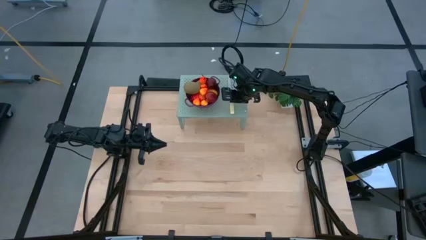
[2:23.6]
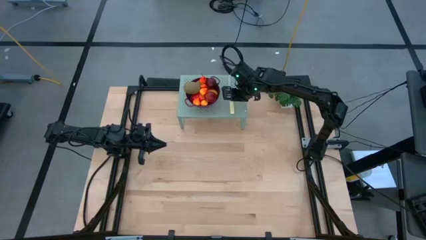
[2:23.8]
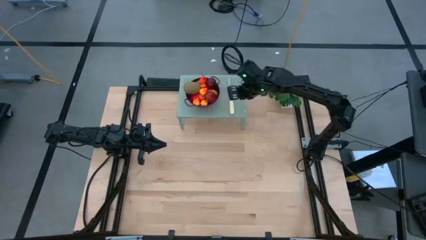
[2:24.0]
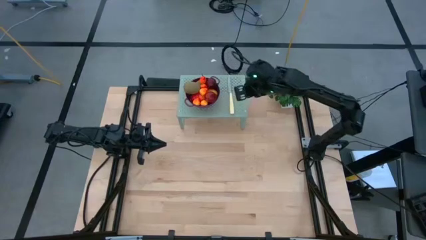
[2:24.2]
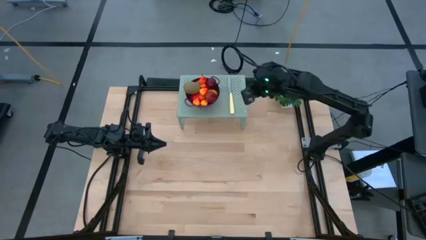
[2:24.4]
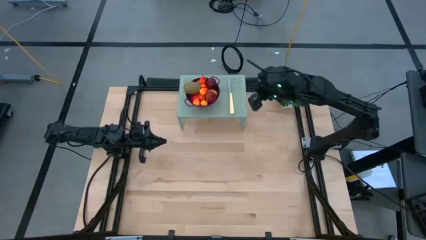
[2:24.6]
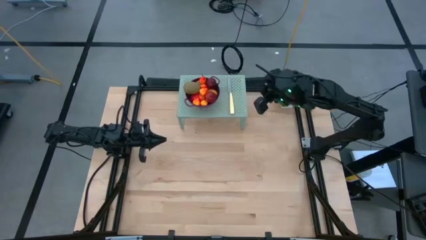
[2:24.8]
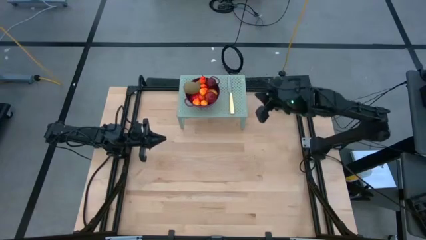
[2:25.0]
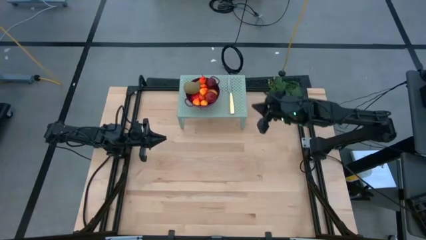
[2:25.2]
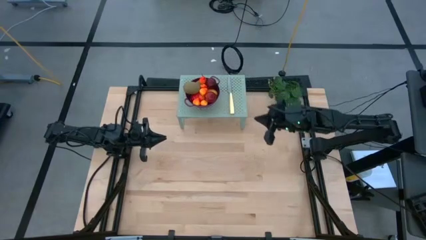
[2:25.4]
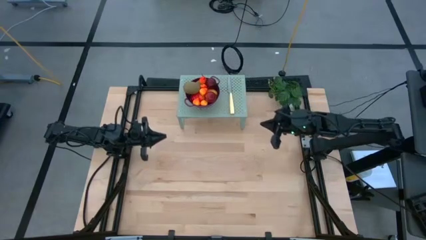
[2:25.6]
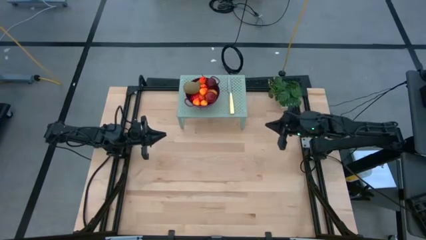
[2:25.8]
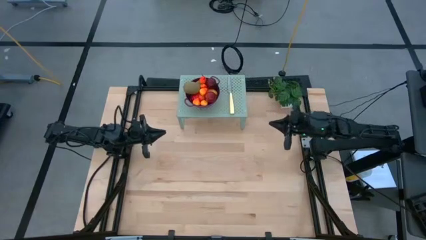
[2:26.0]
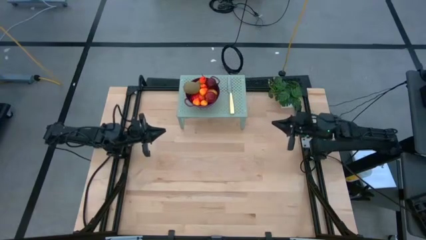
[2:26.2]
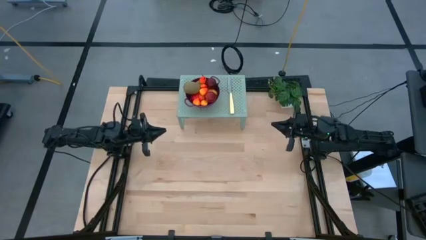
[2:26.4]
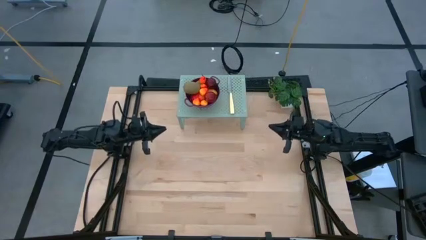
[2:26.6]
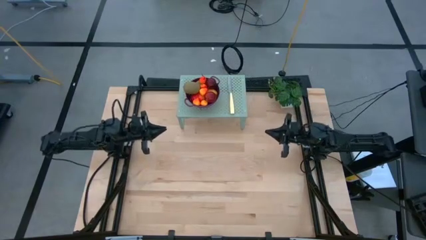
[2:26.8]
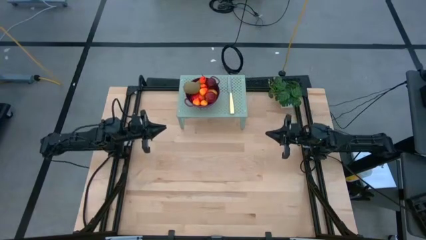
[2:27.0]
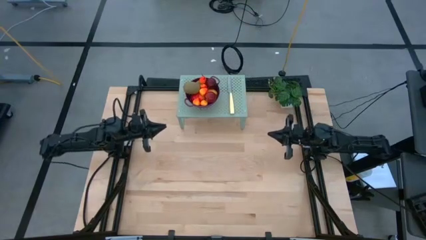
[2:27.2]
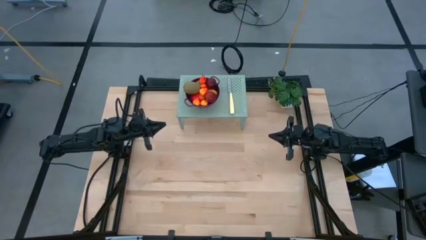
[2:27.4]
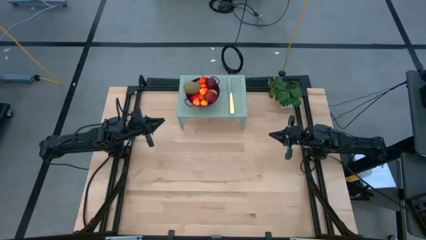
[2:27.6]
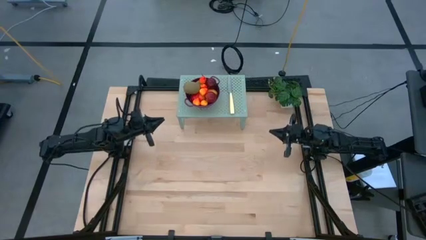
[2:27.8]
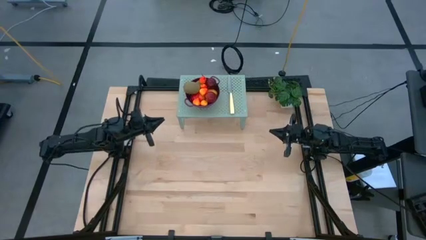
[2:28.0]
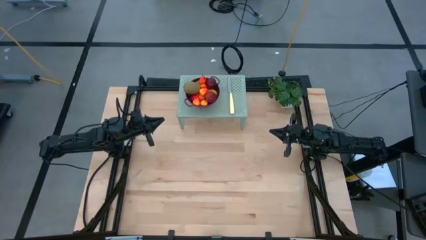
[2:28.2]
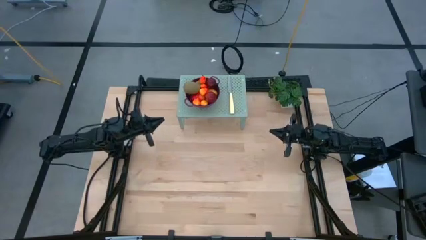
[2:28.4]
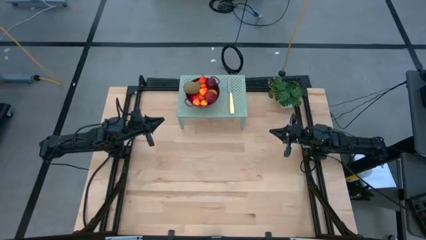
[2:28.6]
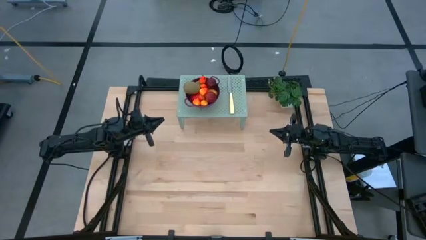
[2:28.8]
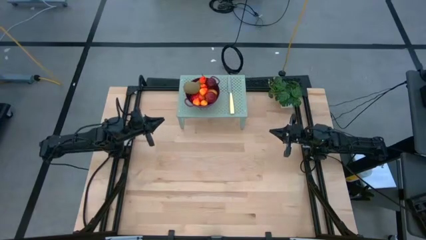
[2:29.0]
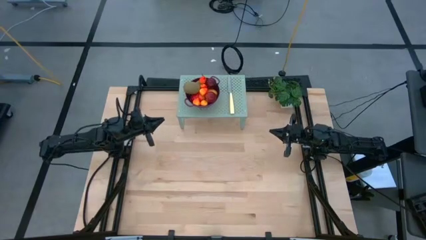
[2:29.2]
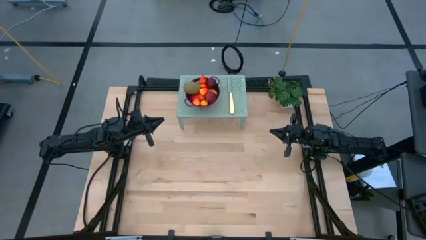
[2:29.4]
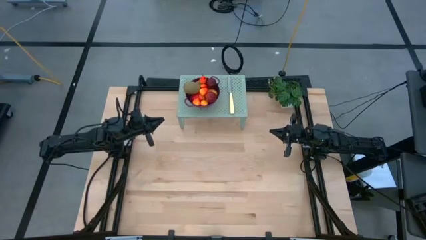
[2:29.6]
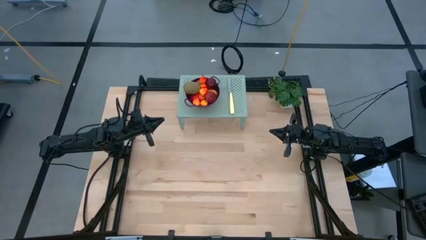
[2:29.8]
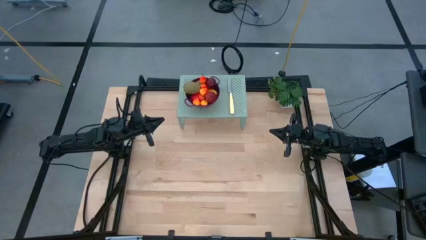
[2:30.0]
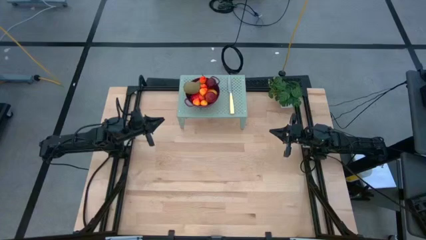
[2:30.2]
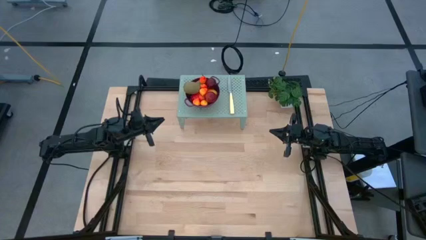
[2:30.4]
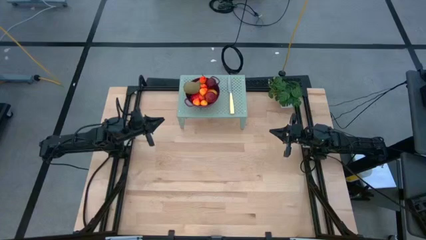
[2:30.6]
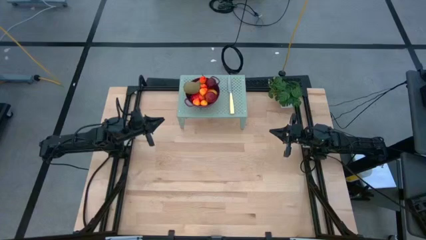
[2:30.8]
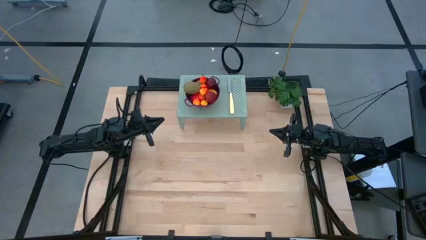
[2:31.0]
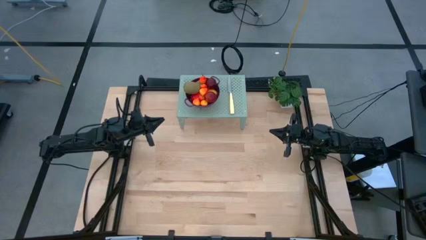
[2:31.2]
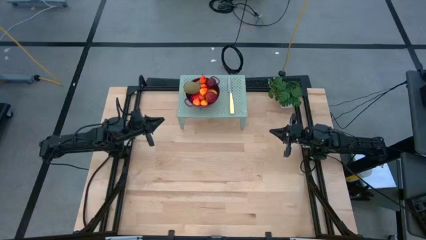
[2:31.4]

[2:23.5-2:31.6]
Task: Pick & Place Fruit
Return to Home Position

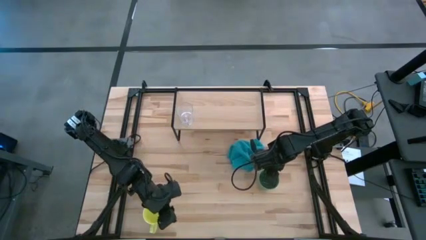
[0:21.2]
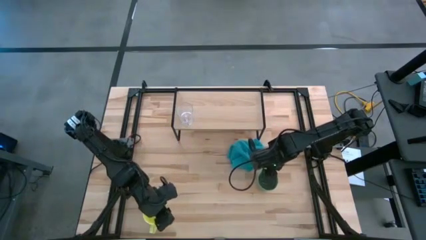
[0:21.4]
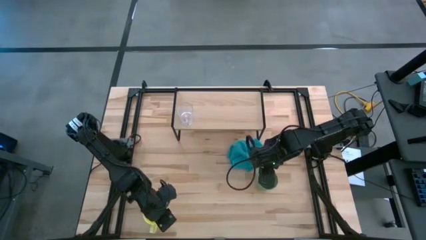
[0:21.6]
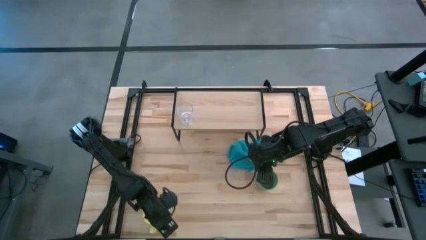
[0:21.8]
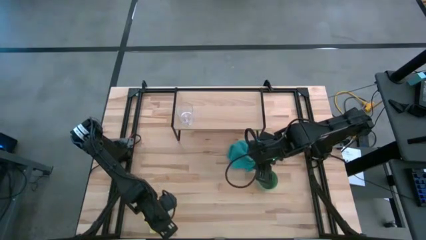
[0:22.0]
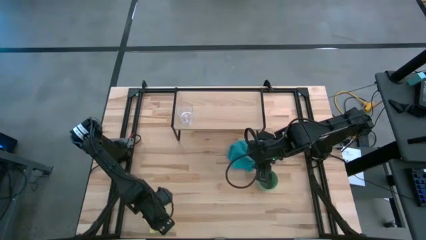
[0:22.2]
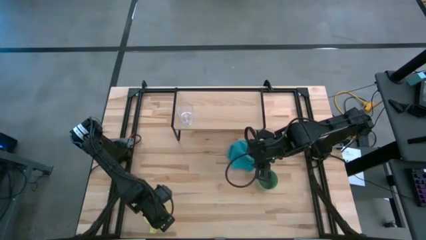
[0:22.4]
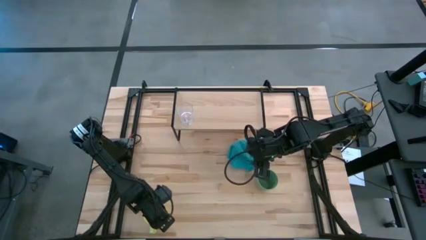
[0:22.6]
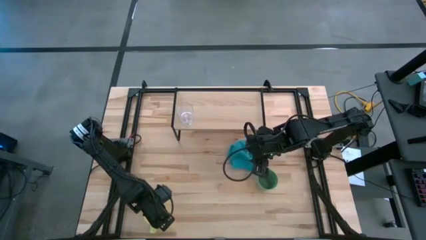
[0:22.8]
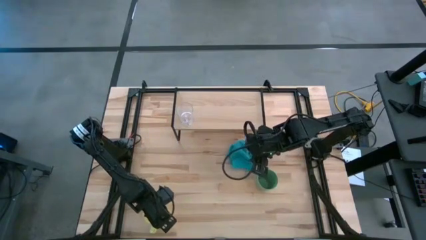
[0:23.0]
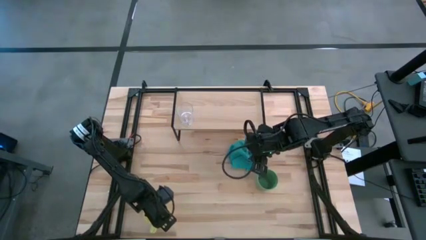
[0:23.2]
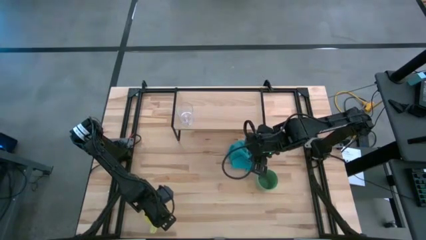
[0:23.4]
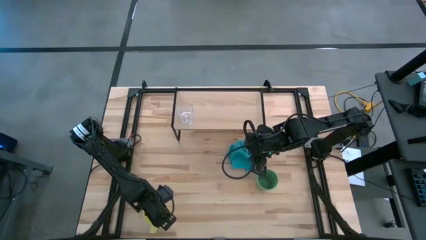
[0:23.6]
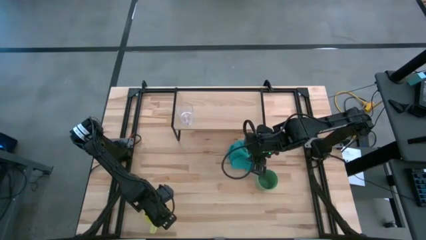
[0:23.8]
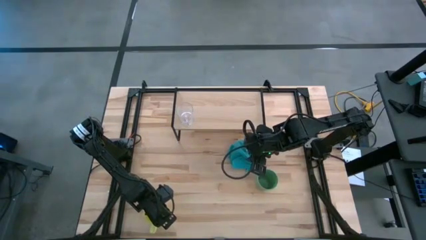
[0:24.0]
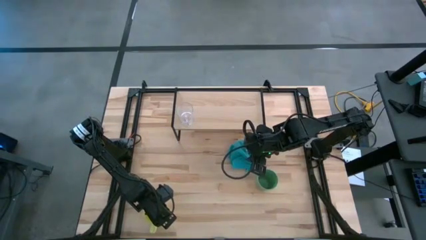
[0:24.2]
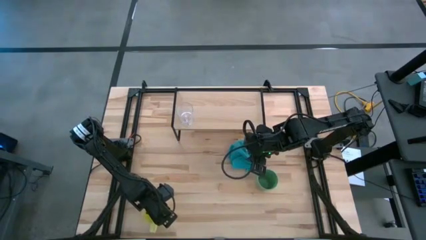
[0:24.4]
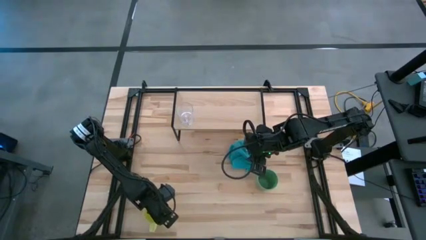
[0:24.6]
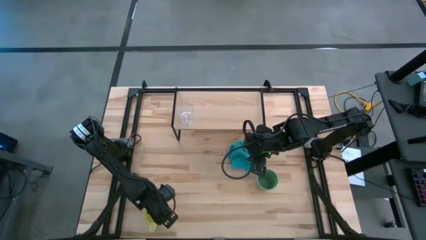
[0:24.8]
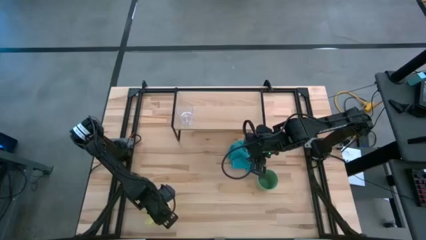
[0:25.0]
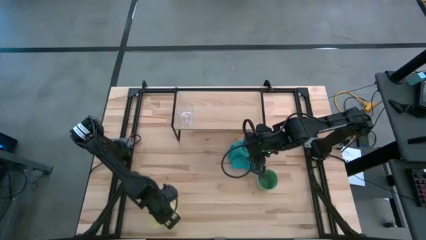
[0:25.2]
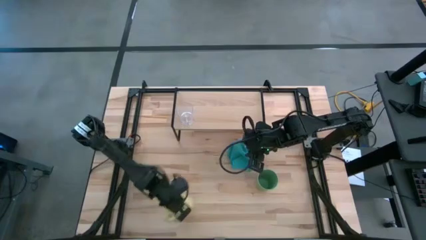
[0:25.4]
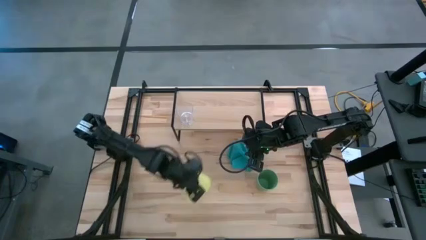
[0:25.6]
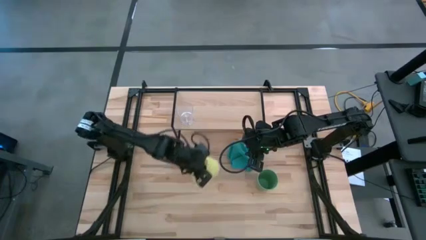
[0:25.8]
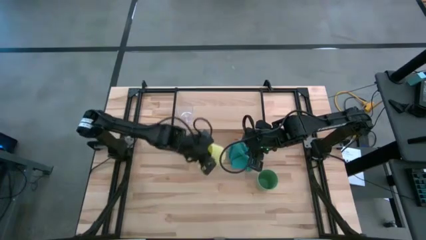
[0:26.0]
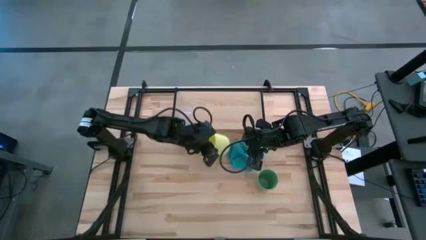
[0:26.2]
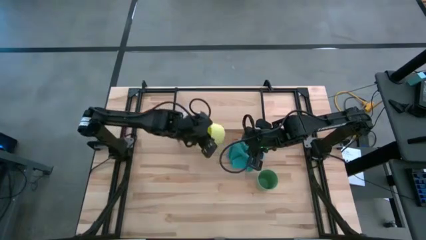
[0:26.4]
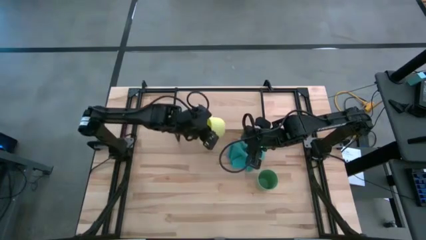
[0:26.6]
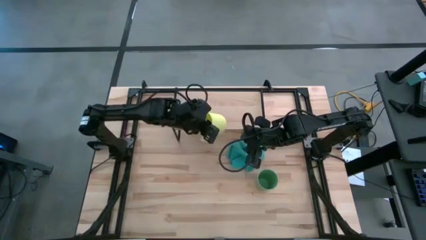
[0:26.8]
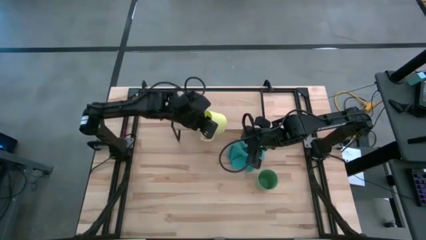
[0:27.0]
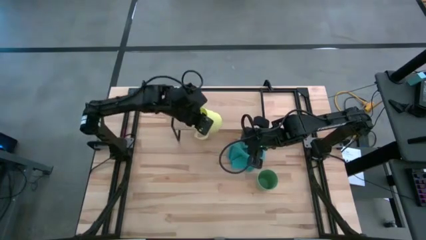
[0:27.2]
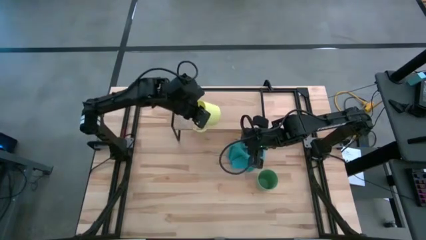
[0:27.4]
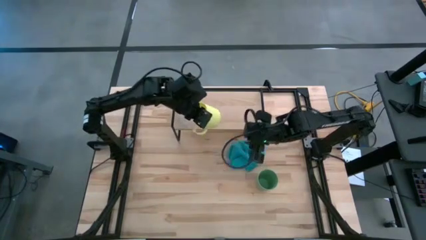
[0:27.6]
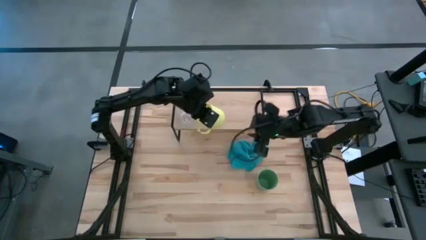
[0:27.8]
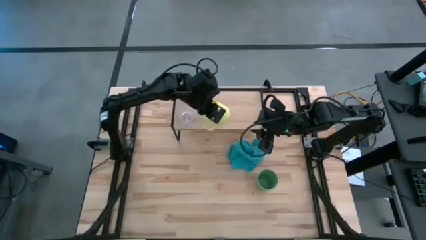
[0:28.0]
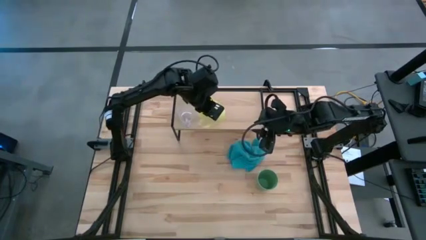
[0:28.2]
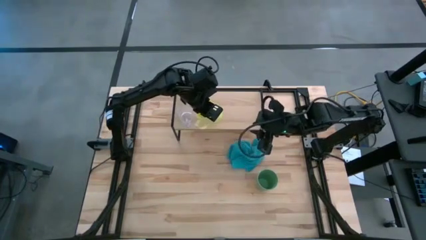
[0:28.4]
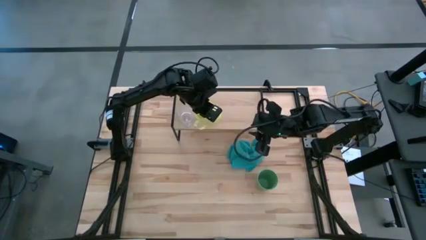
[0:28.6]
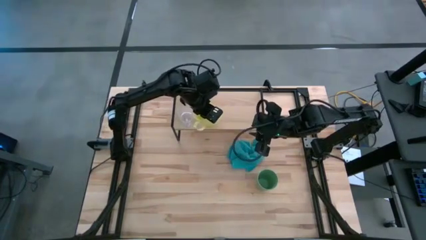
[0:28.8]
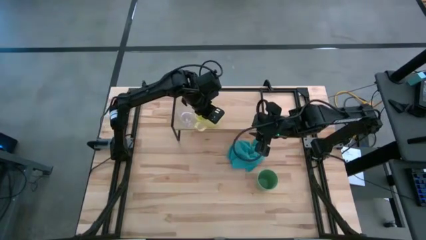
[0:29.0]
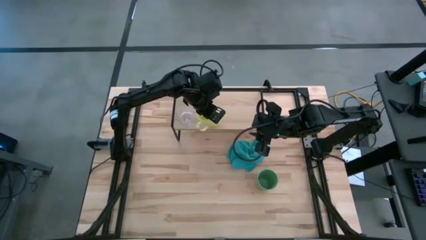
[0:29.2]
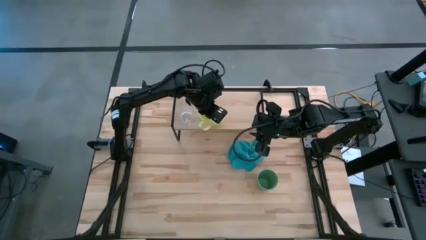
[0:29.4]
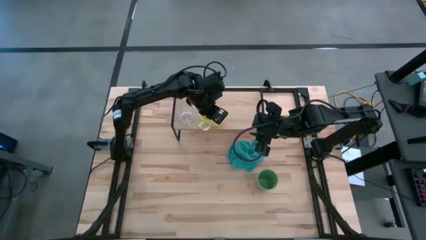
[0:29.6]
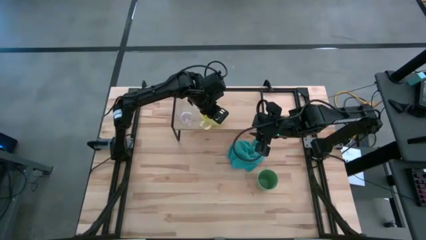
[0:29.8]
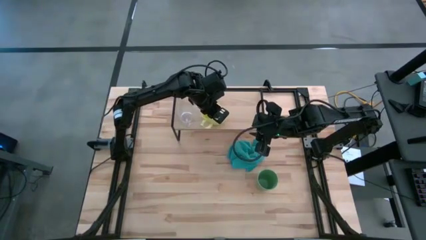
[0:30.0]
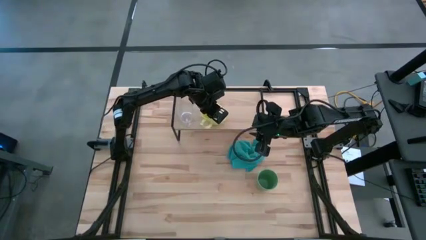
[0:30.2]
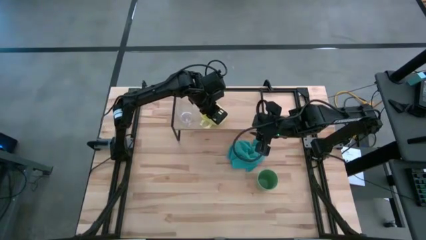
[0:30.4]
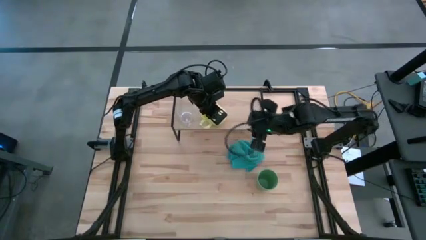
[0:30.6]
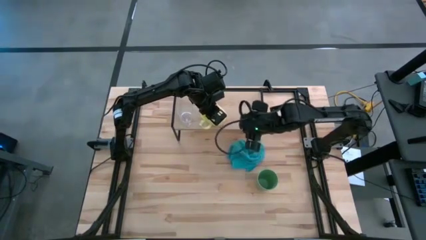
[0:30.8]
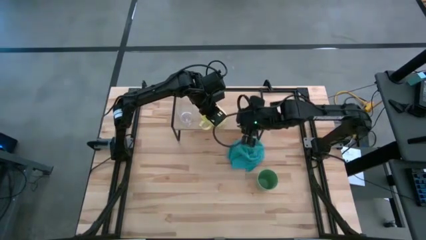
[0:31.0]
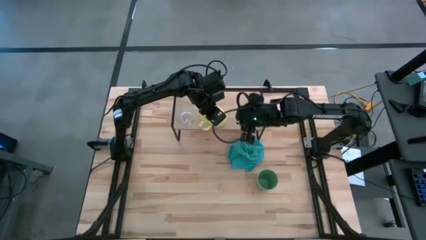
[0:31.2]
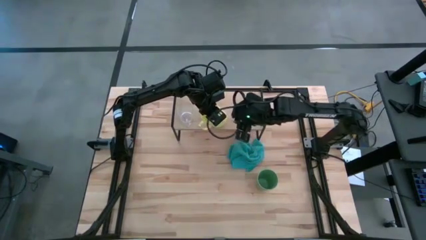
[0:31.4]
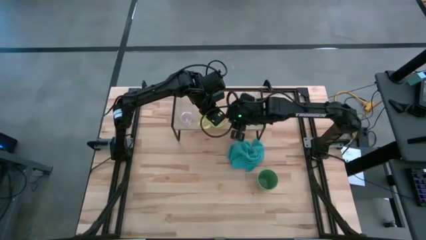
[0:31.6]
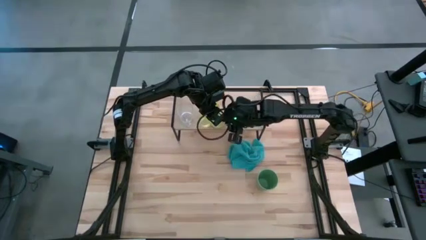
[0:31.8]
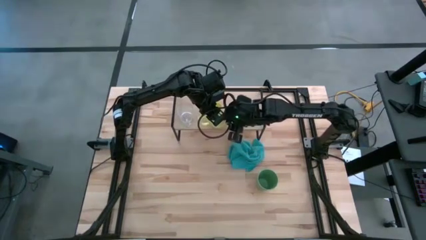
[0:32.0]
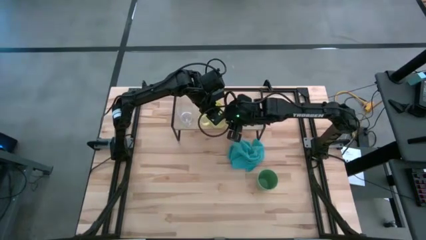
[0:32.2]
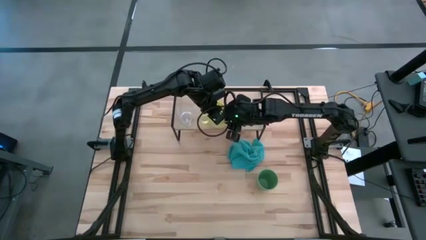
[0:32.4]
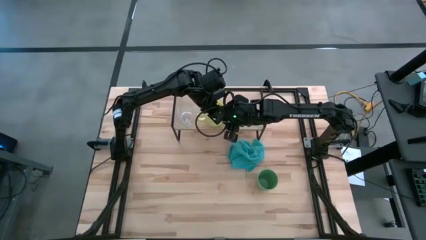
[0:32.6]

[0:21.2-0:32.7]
Task: Stack small to large cups/mugs on shelf
Put the yellow mug on the shelf
